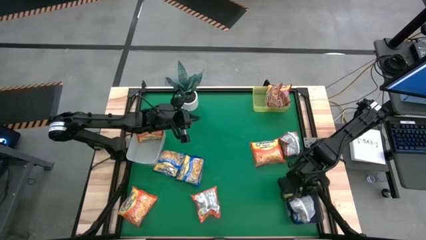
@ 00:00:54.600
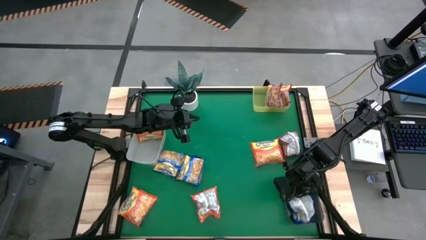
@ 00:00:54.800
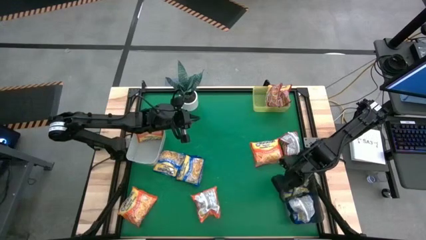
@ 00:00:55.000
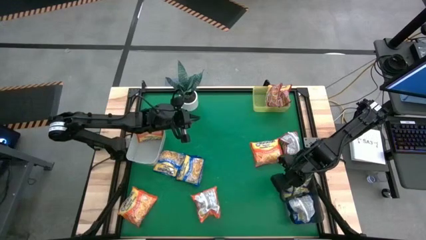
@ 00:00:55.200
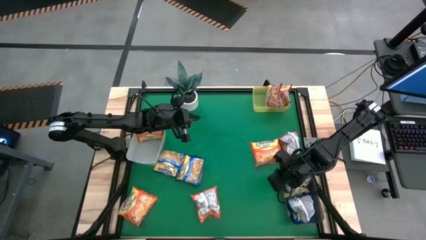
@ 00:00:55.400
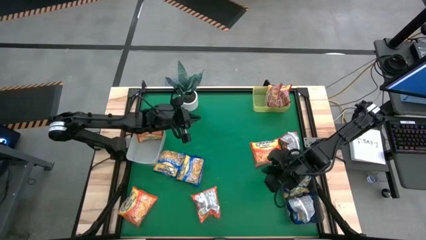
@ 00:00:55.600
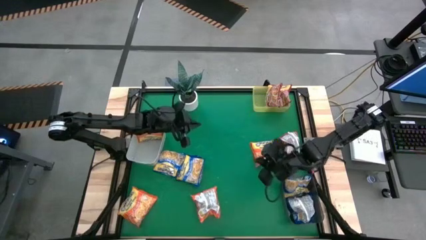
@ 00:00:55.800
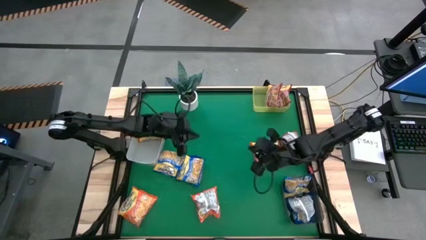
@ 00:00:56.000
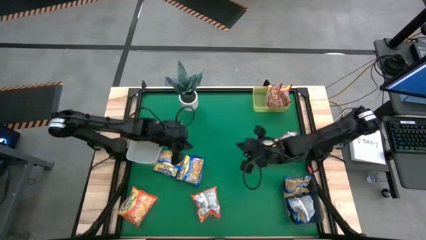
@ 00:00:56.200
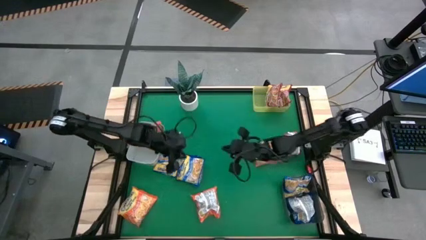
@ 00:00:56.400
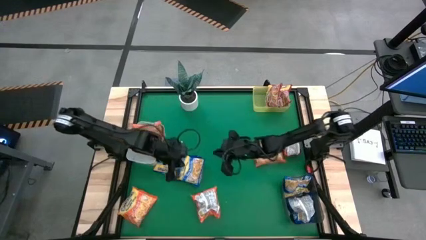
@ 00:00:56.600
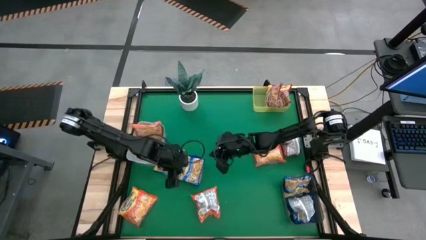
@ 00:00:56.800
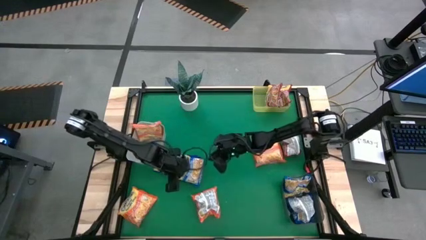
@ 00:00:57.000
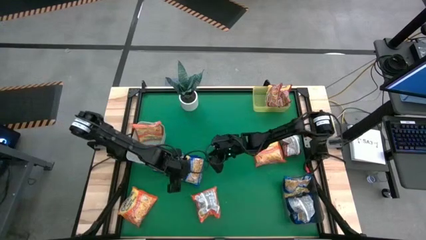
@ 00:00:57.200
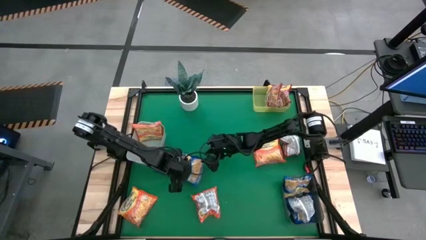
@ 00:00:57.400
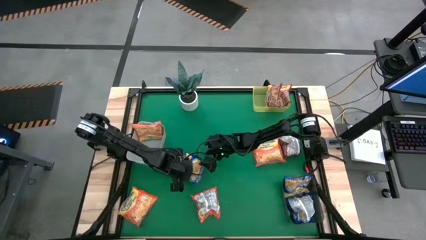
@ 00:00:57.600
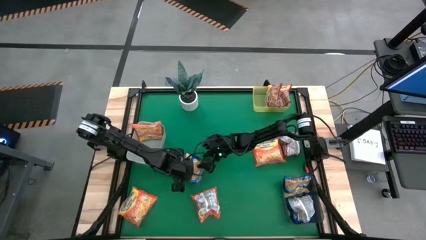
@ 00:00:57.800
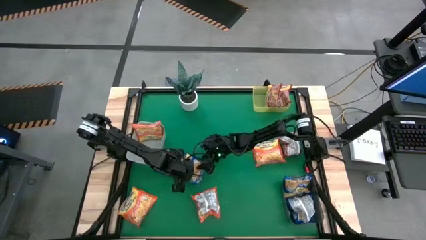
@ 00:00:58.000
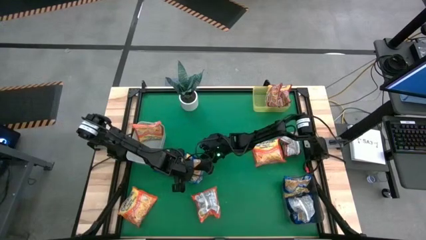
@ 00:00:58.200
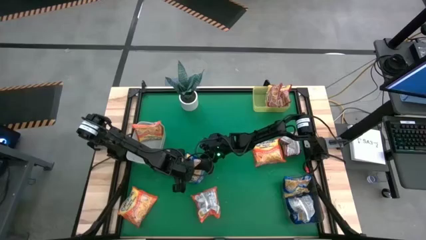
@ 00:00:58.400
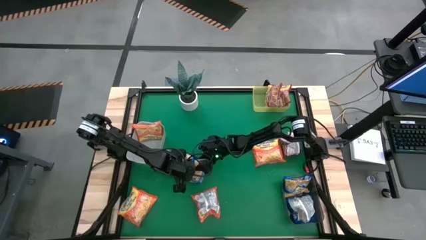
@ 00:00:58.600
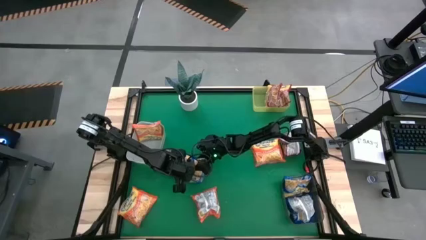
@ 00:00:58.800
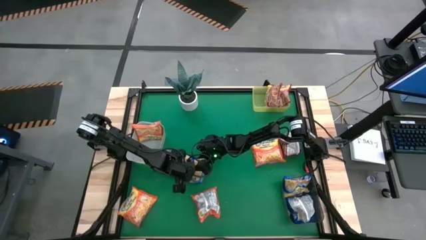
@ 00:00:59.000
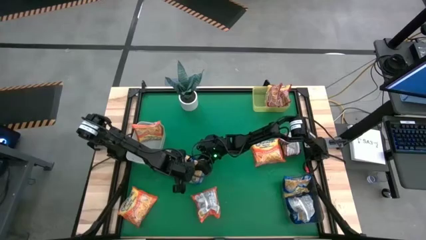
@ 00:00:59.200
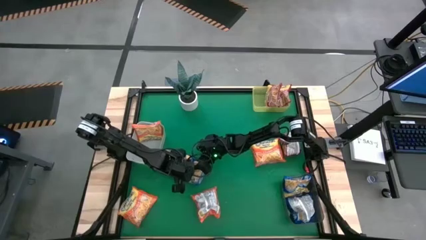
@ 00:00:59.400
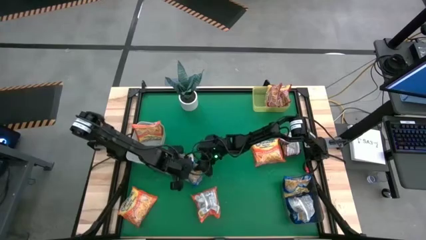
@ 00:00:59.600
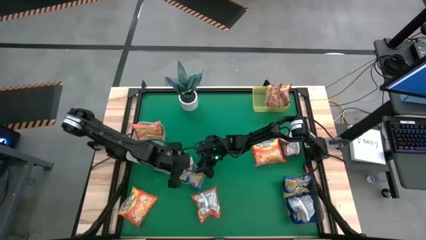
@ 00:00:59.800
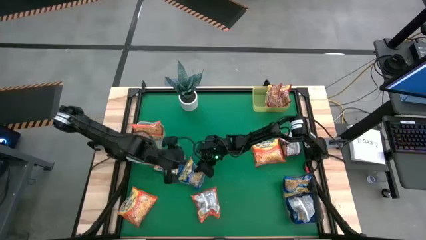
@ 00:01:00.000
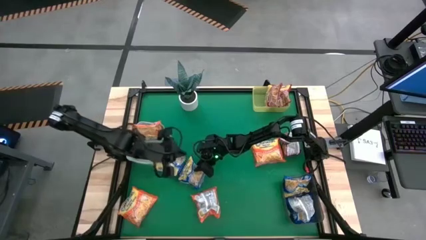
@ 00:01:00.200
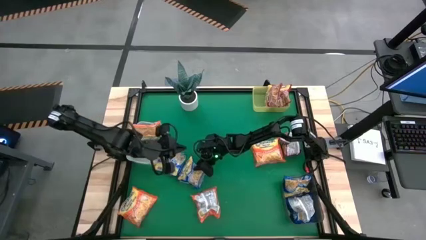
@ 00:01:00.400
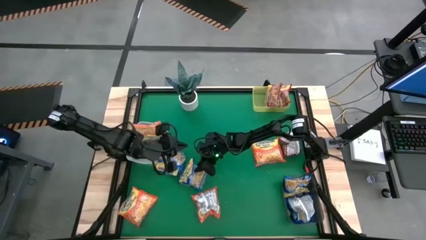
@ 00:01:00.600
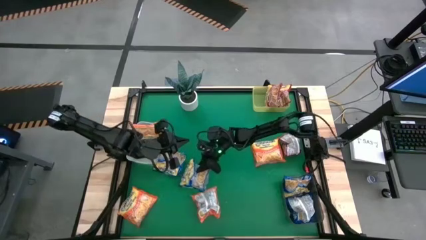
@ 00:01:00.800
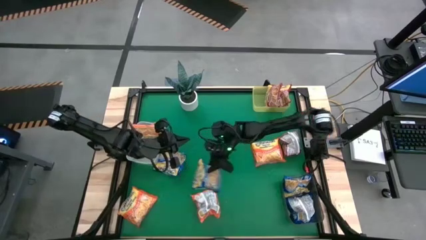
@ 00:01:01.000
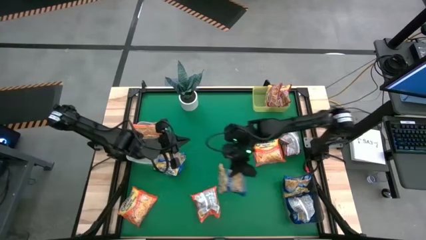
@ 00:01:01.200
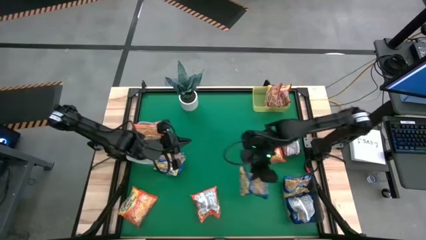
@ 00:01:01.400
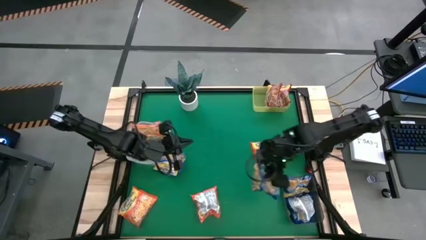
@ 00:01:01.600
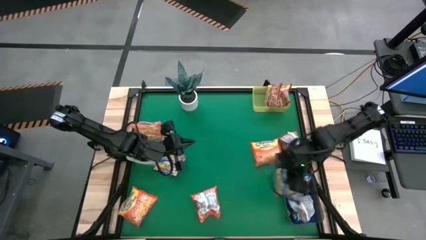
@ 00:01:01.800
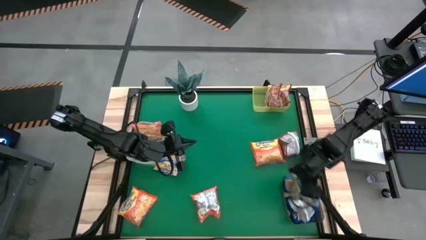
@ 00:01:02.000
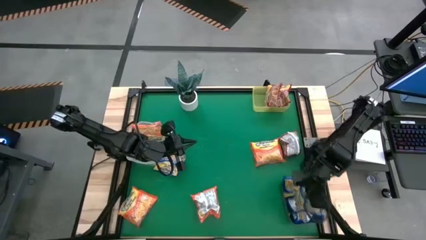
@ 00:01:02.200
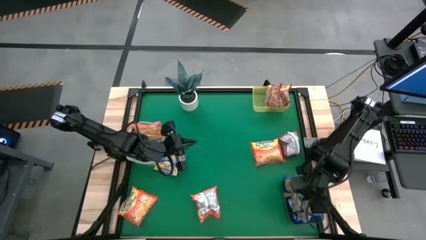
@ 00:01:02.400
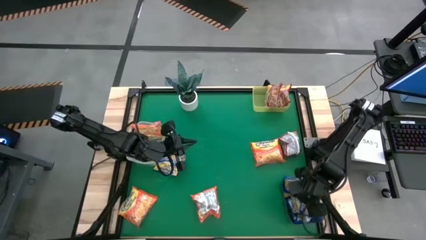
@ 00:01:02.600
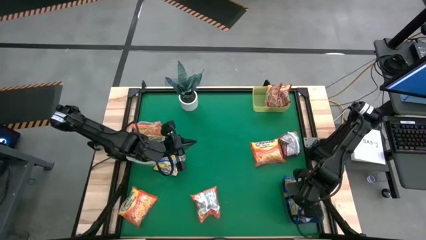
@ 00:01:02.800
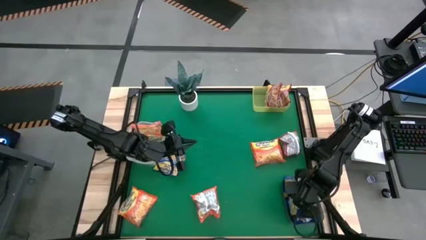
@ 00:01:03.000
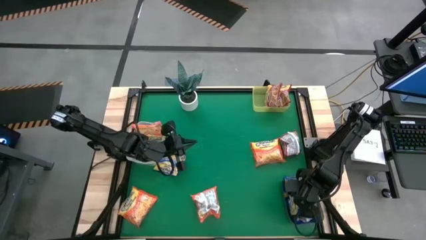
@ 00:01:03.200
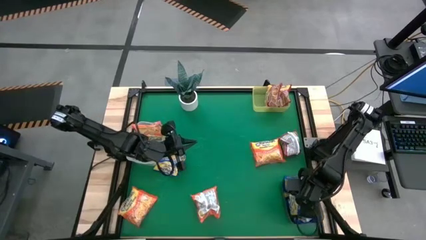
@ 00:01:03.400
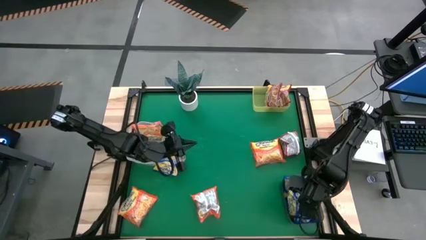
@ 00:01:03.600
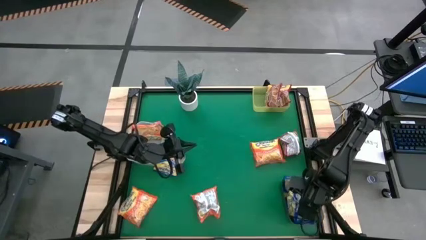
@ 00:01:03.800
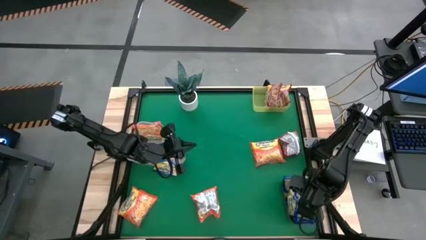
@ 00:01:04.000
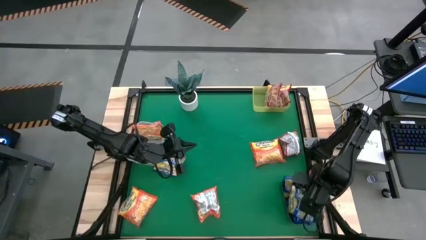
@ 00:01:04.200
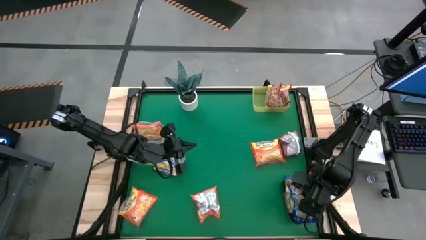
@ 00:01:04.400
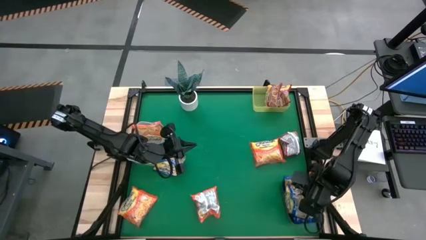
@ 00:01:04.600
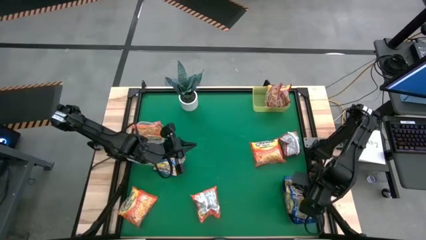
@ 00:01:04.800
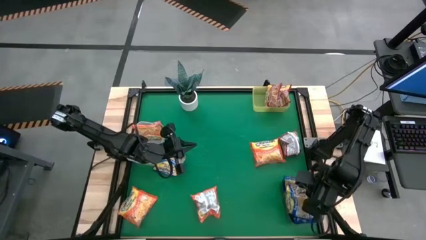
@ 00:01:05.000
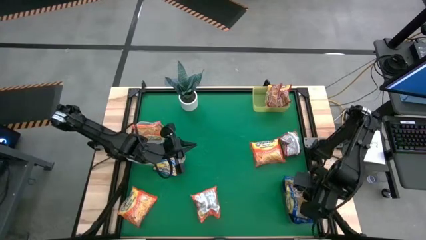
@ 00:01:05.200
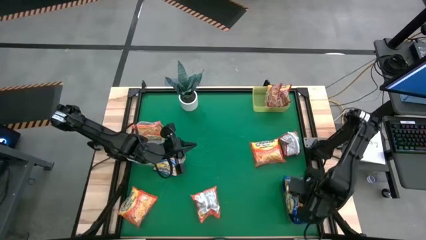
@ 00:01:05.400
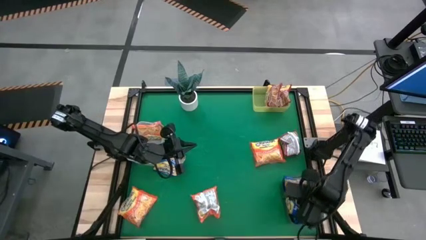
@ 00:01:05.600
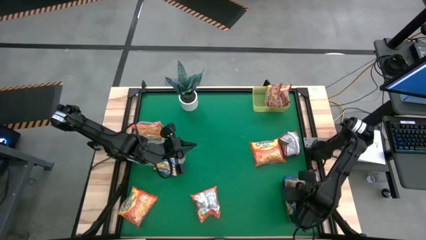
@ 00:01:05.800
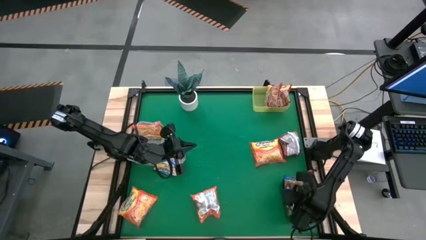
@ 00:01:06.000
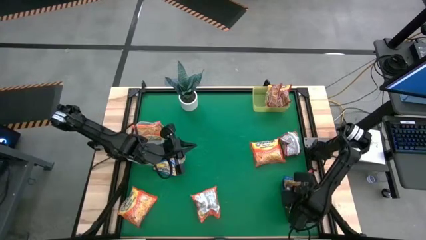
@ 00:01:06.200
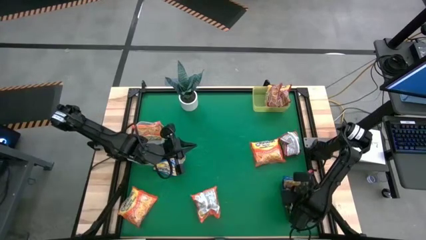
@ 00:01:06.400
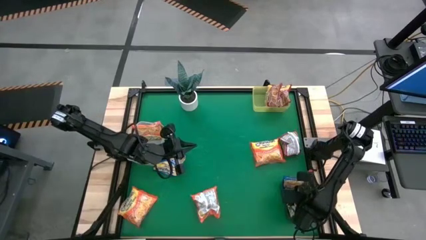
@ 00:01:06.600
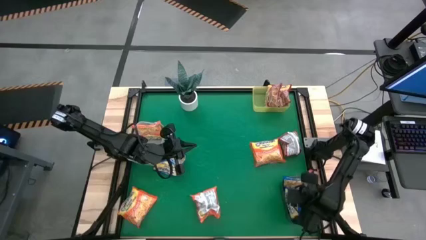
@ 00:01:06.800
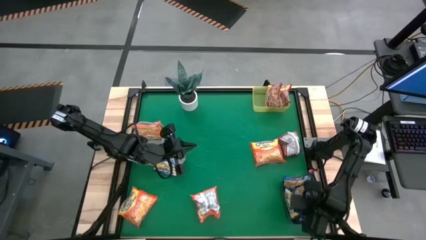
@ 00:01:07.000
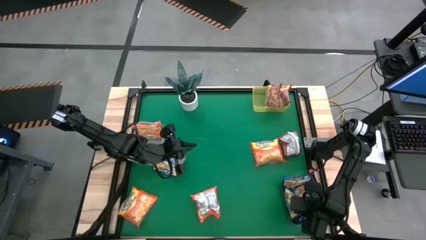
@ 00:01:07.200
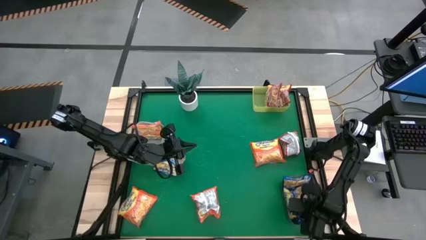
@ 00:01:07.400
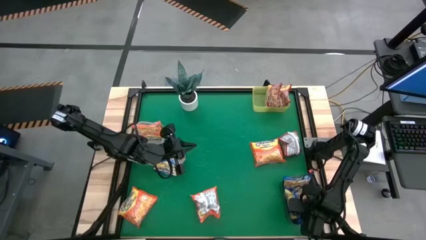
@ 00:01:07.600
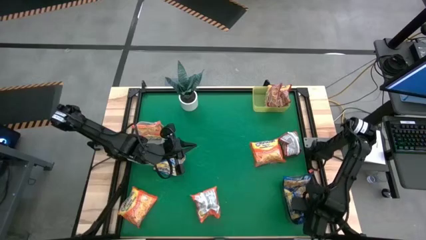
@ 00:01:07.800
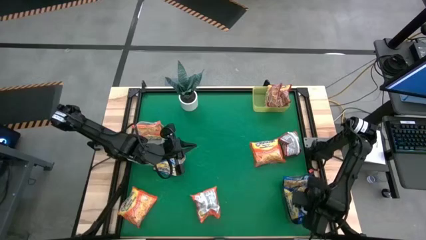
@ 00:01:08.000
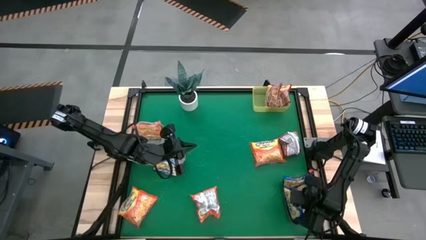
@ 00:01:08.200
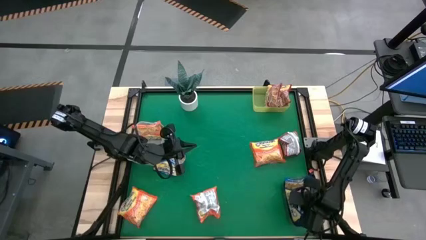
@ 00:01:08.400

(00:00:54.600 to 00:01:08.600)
Task: Sort Maruchan noodles
Put the blue noodle pack into the black bin

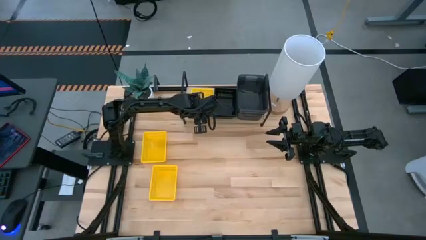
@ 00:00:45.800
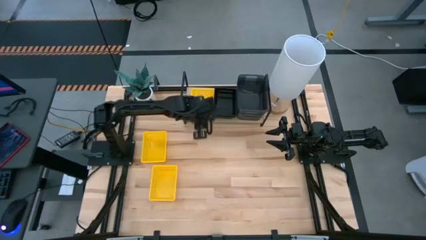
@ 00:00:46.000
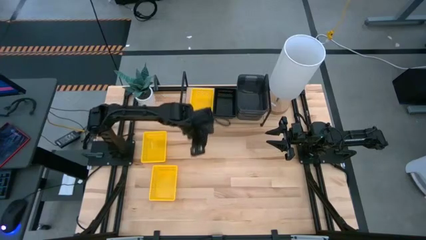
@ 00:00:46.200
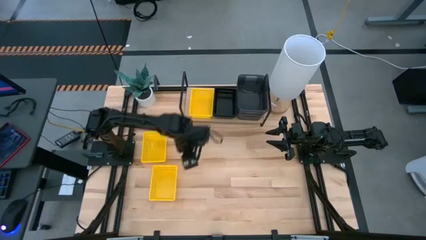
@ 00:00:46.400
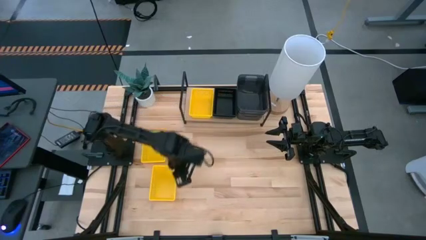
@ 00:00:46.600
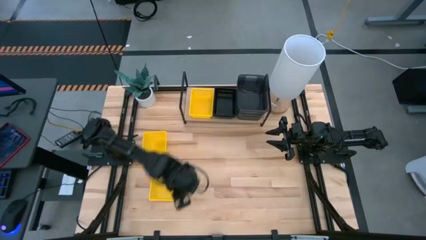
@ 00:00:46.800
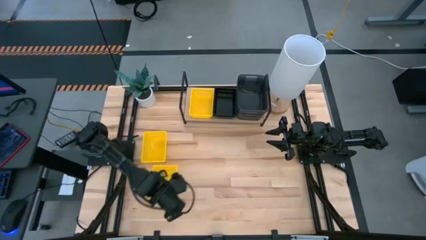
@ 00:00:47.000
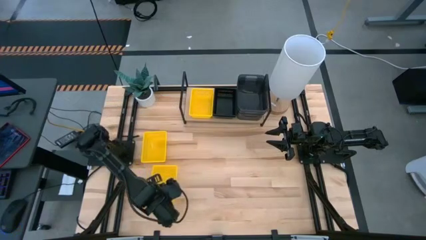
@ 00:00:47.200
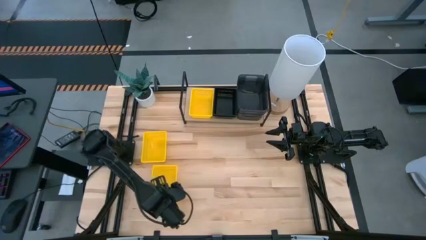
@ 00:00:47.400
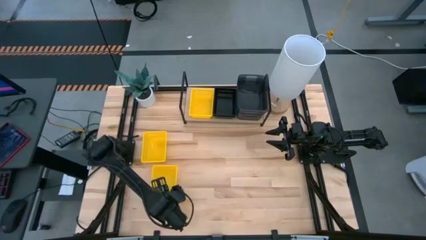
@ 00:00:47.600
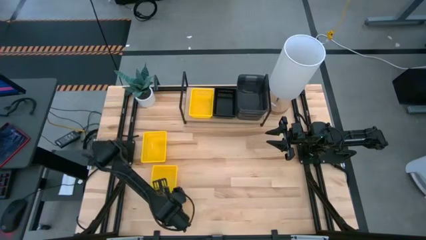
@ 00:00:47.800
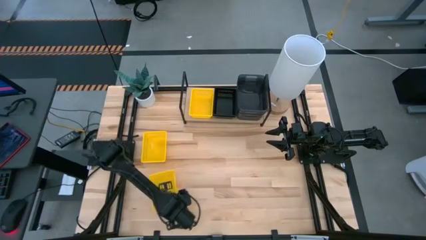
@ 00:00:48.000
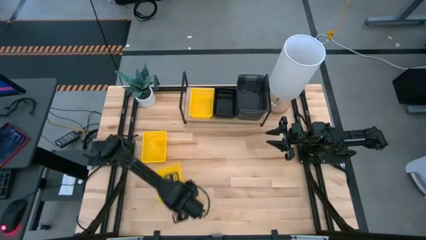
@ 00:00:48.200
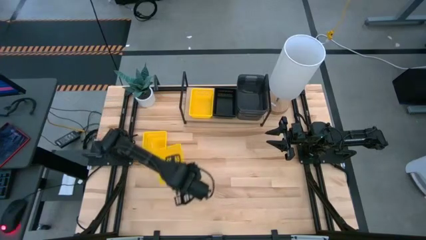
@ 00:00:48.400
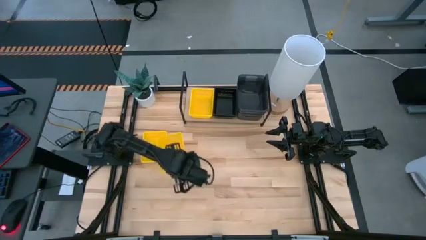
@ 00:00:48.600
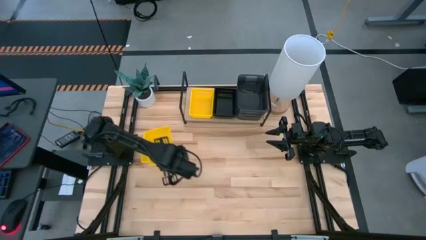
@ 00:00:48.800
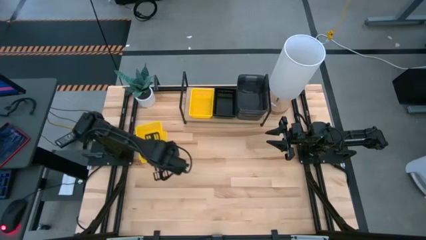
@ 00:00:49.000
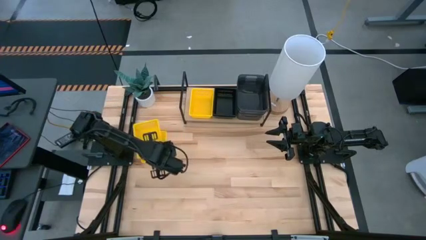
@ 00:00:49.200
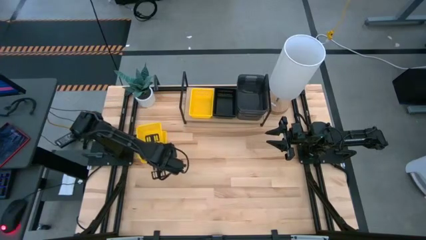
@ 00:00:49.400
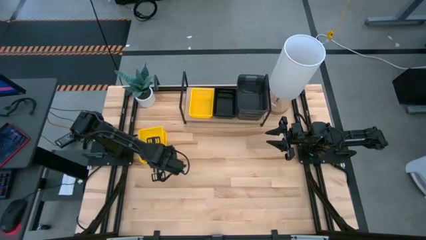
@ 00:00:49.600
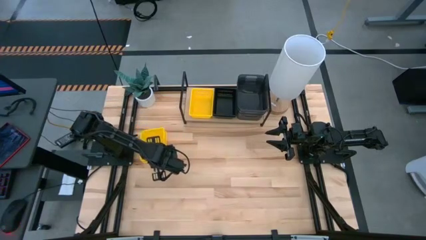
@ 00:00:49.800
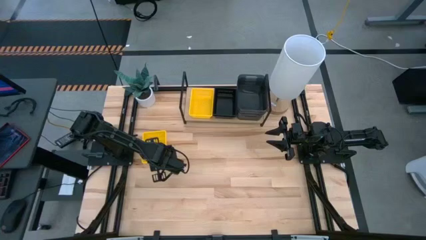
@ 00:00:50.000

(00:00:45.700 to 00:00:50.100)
Task: Stack baskets on shelf by color
Stack the bottom yellow basket on the yellow basket on the shelf
